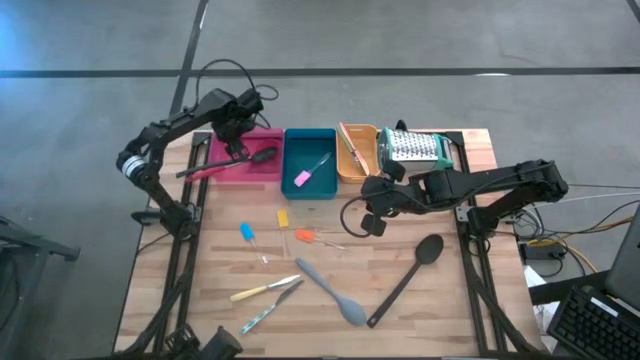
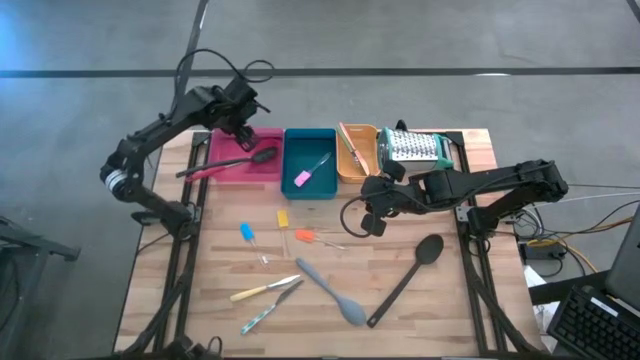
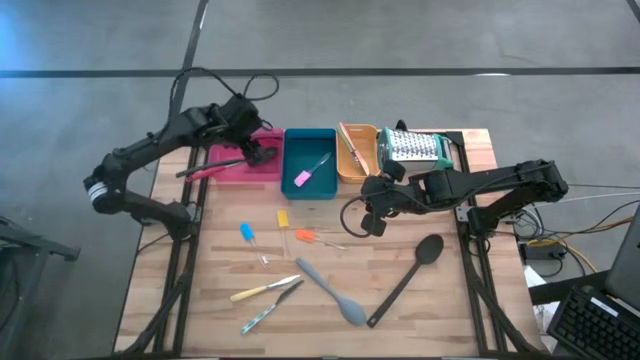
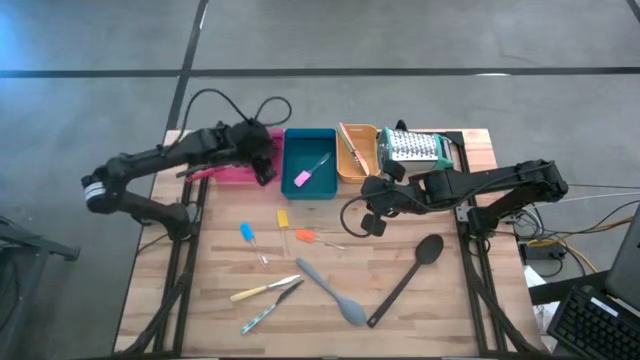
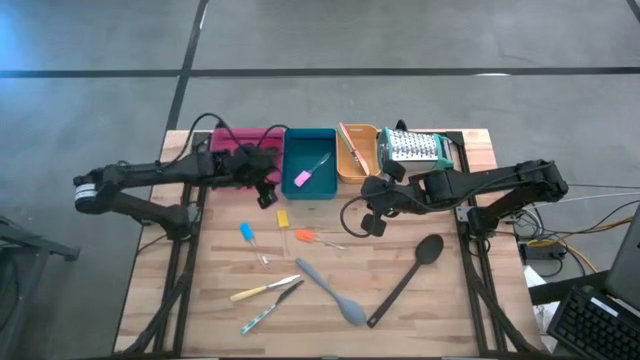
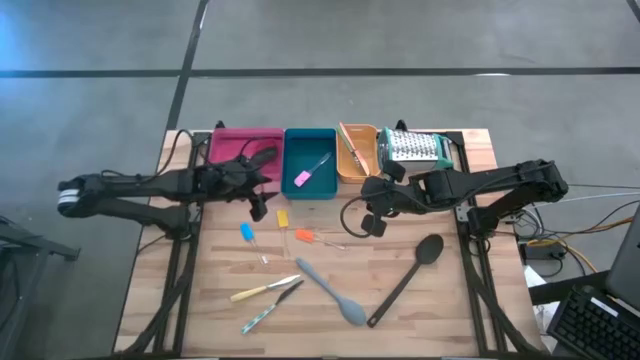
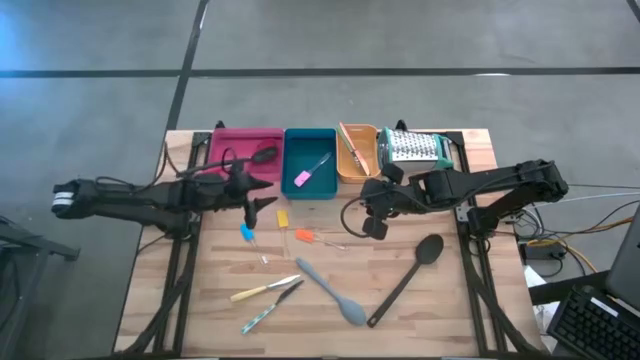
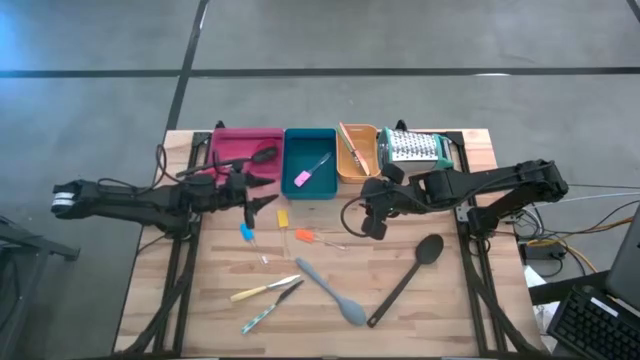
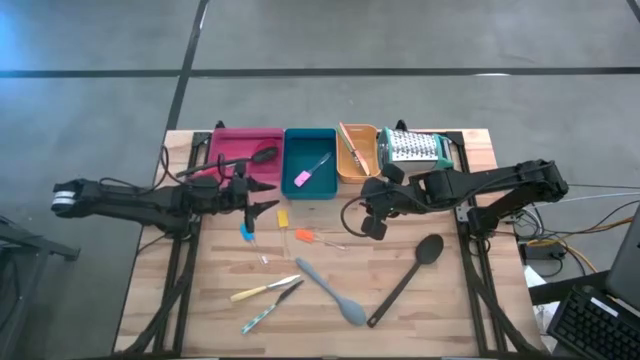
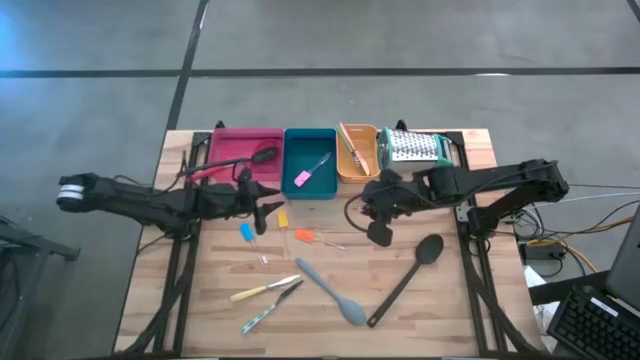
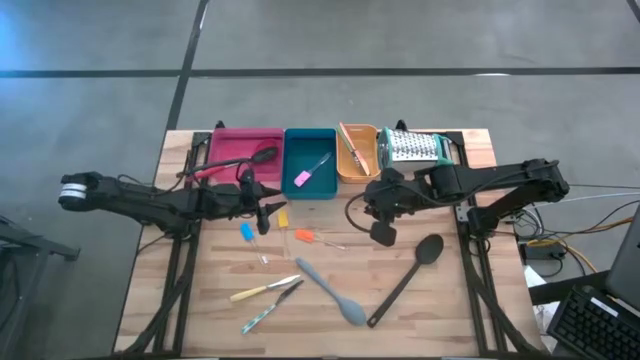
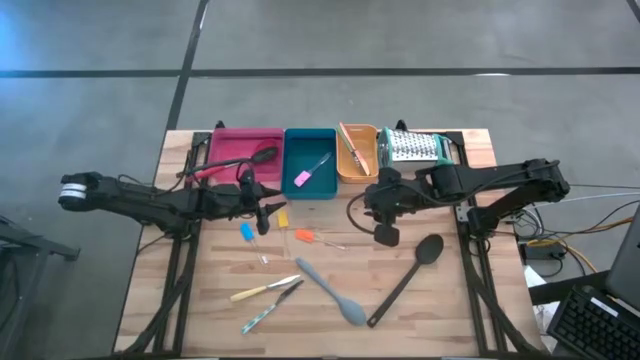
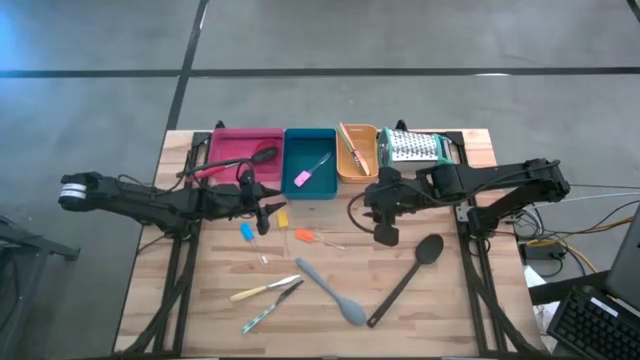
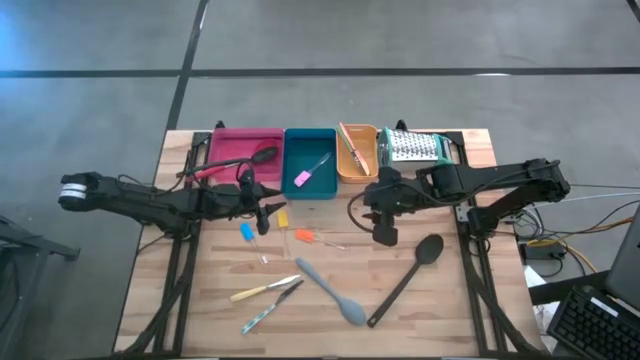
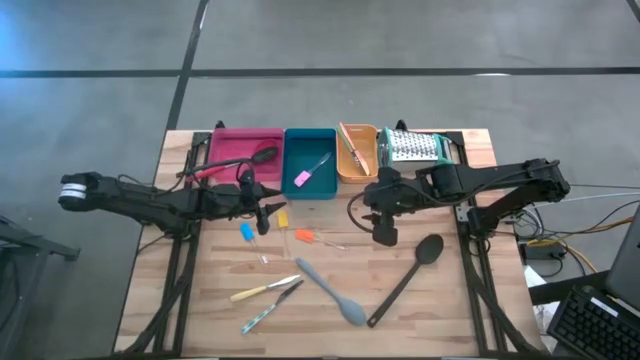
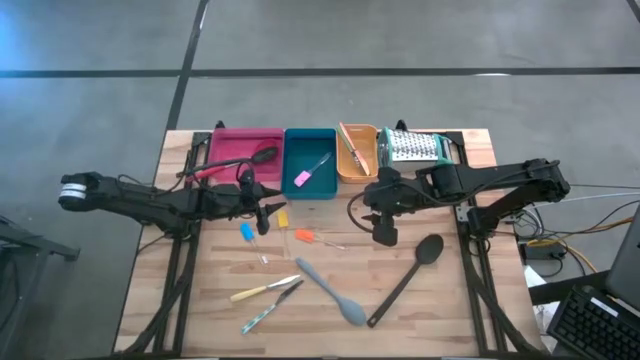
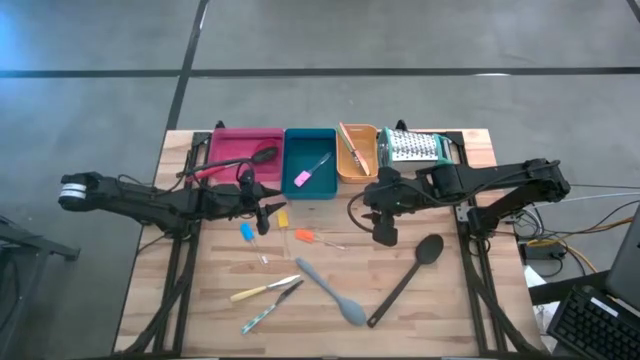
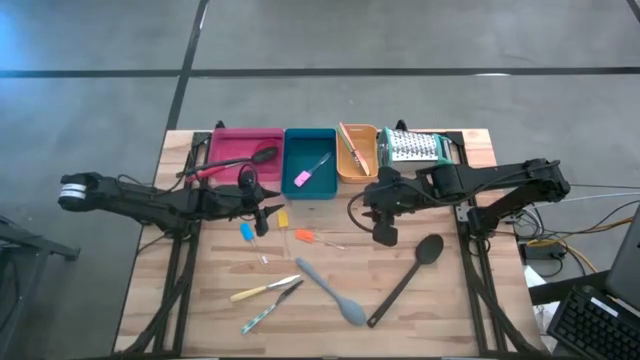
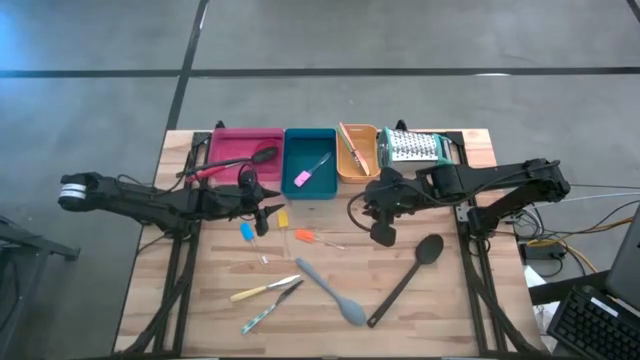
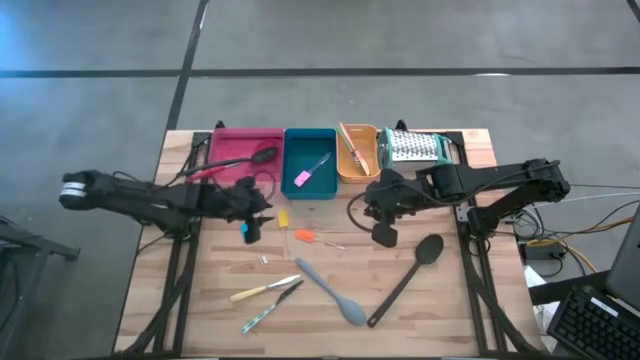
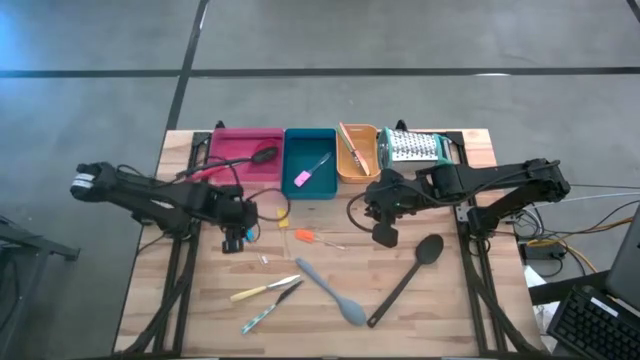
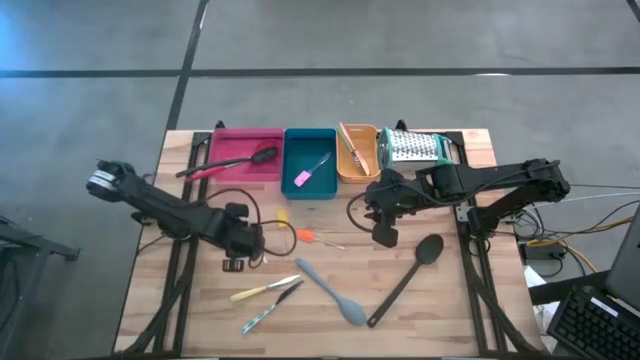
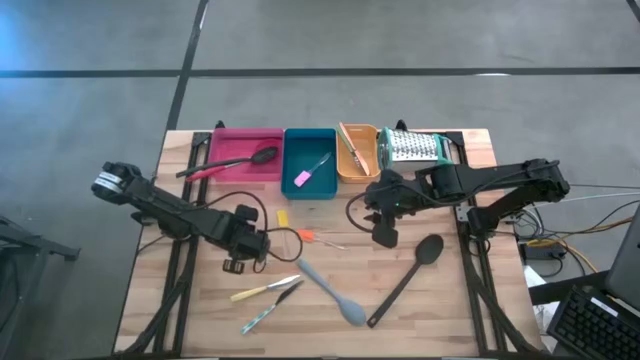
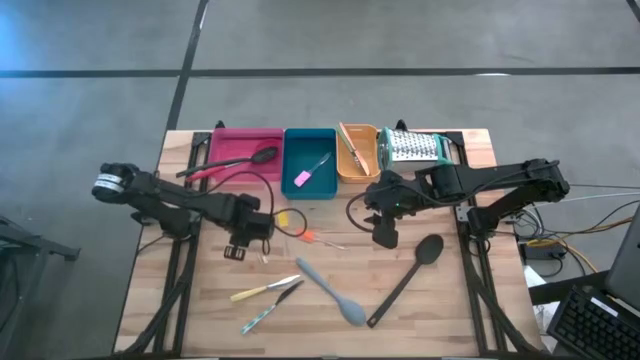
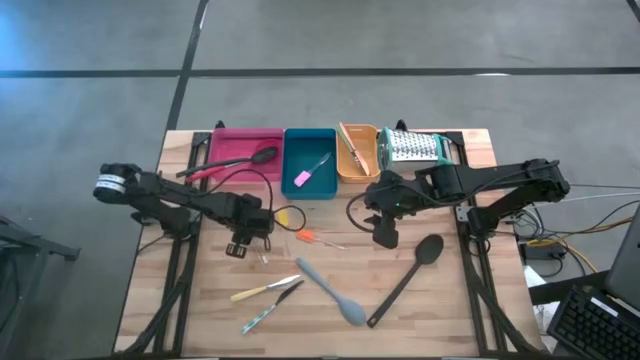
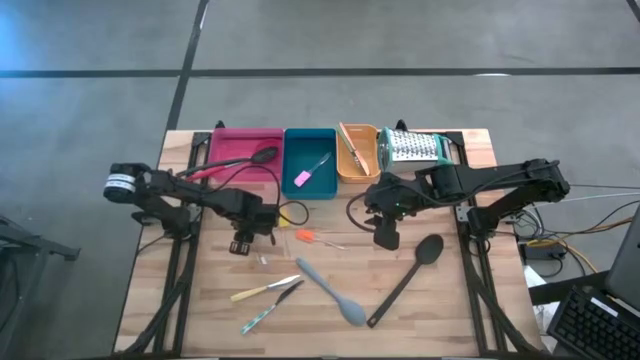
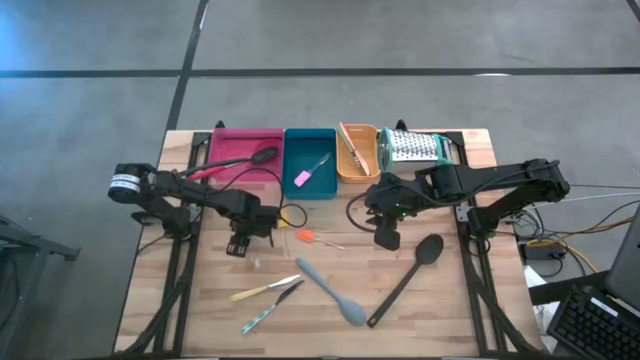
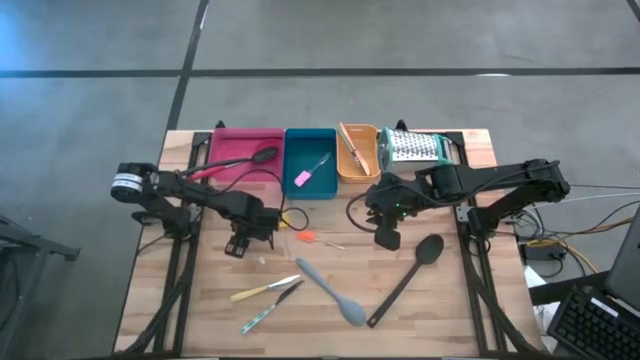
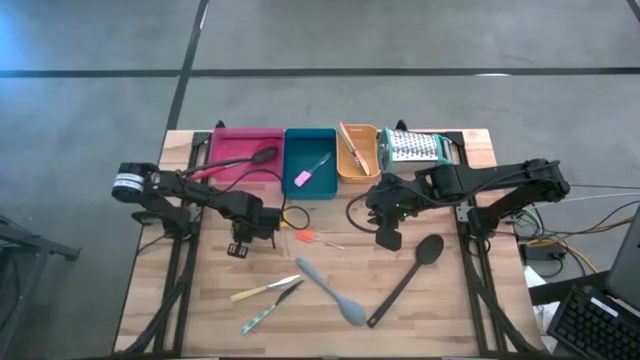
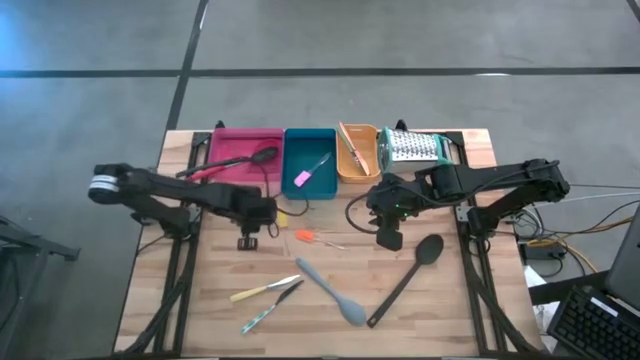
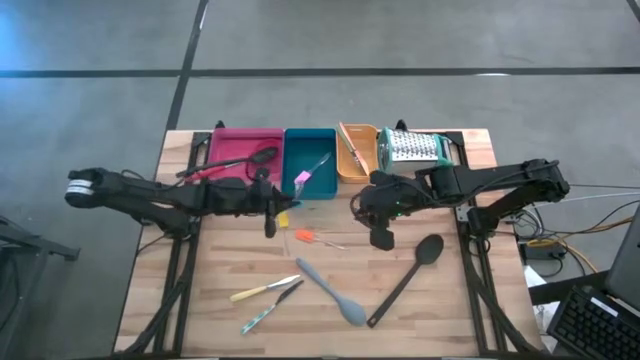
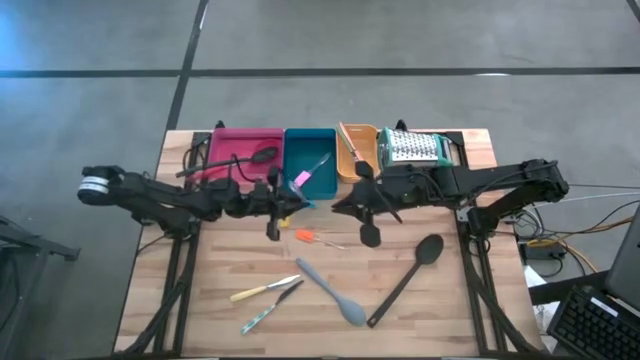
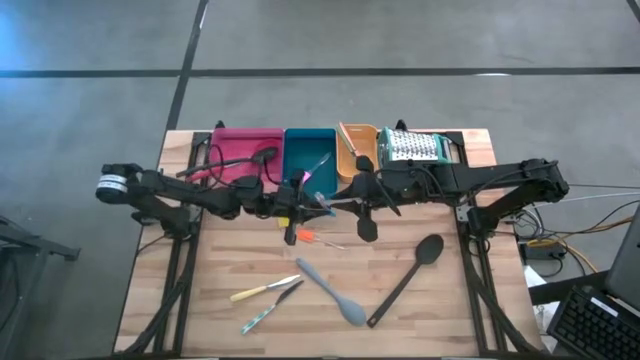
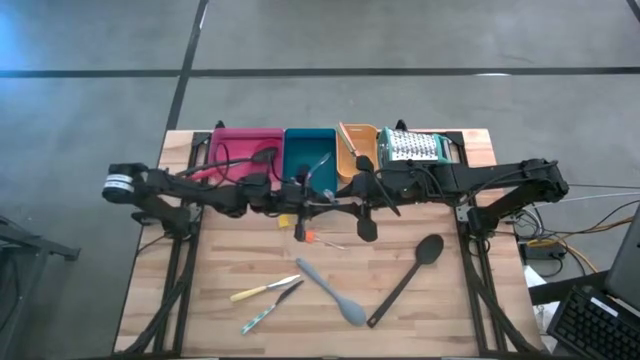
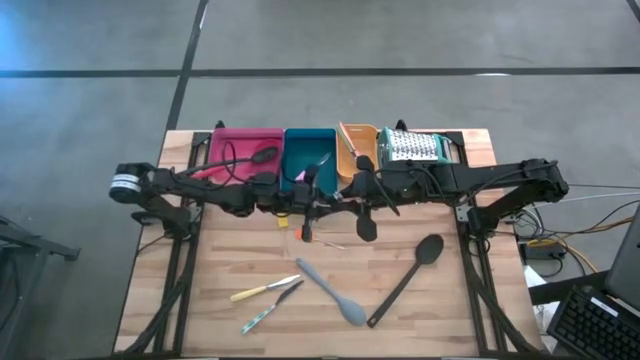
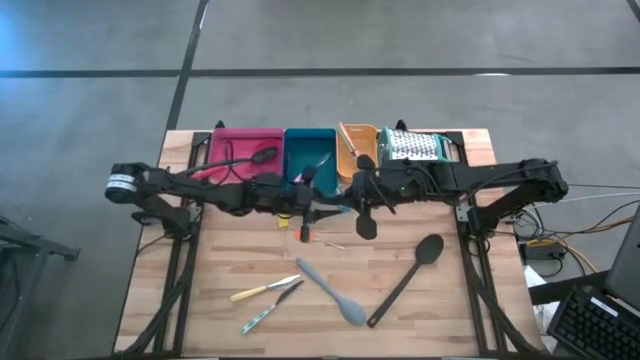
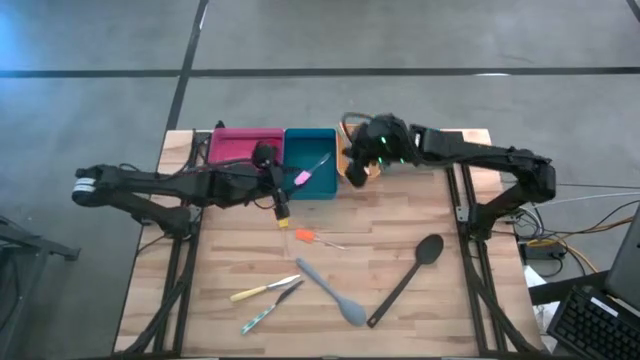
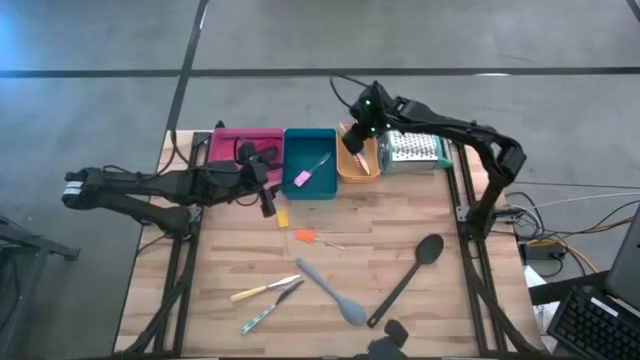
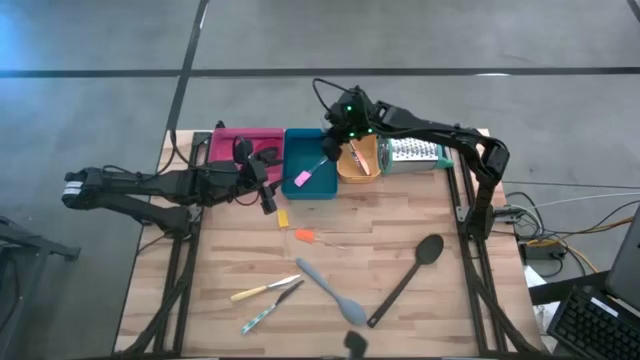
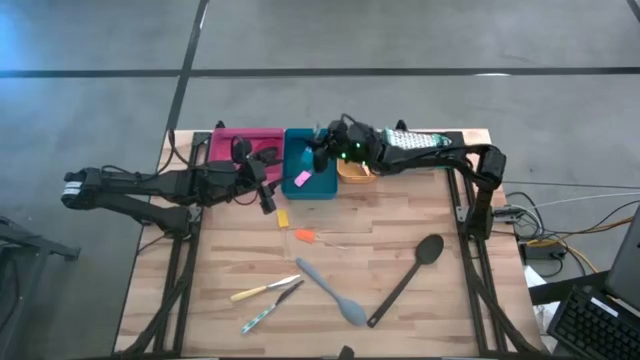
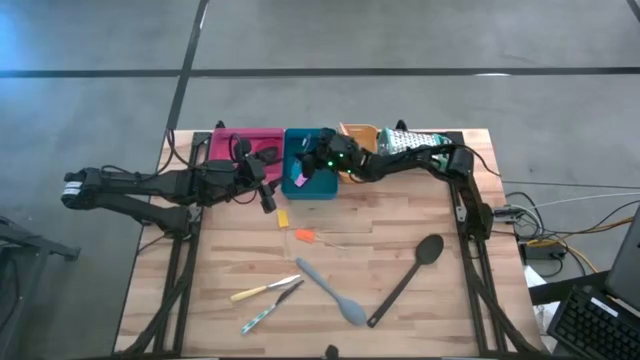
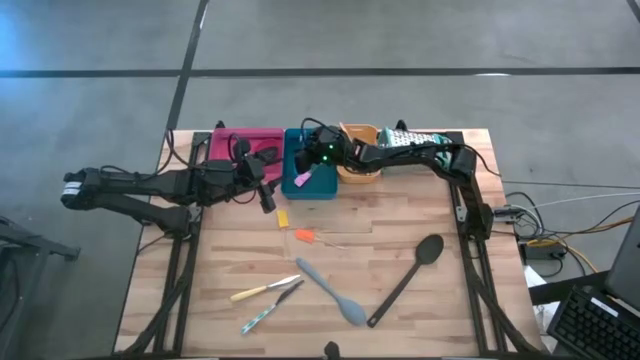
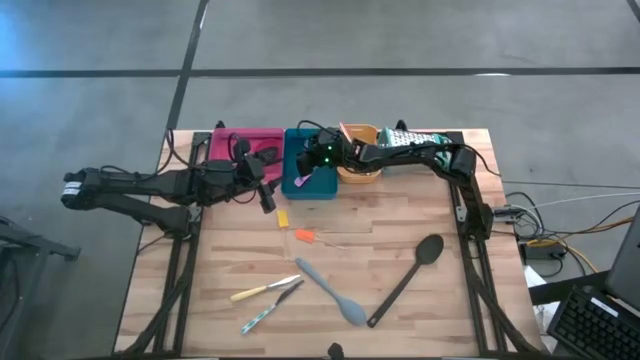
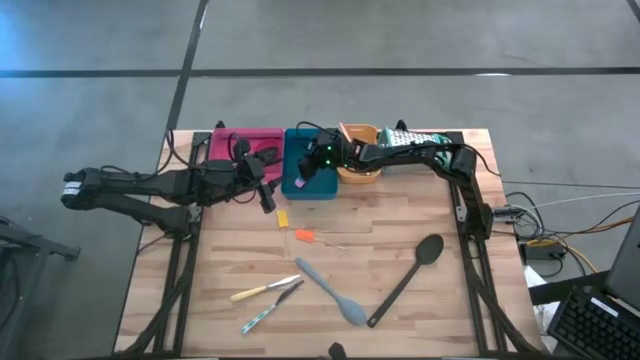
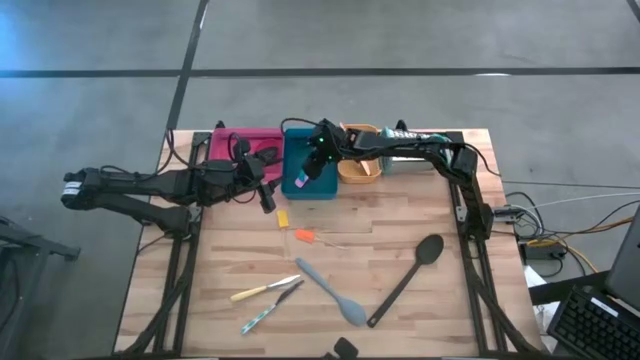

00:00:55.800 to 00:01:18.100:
Task: Pick & Place Kitchen Items
Put the blue spatula into the blue bin
